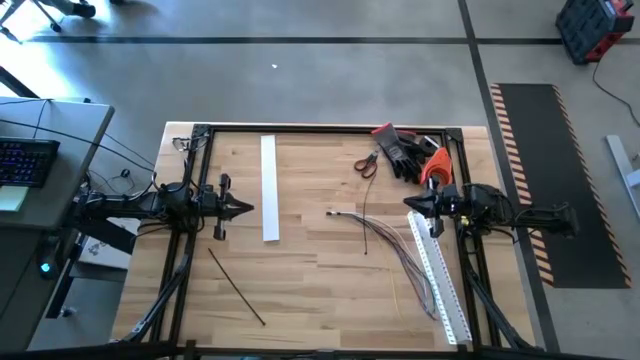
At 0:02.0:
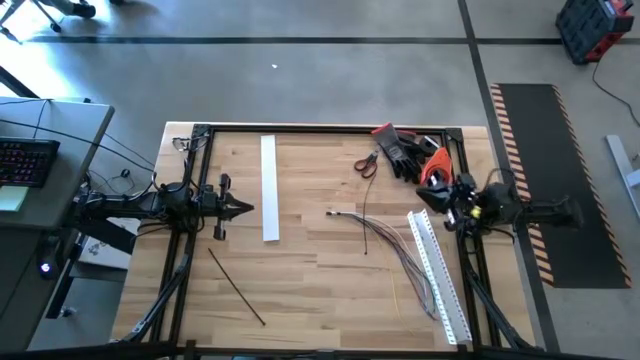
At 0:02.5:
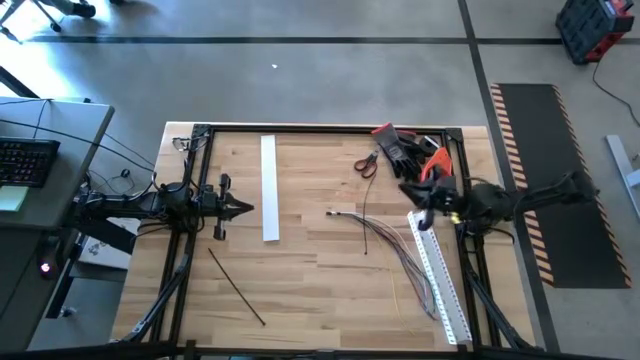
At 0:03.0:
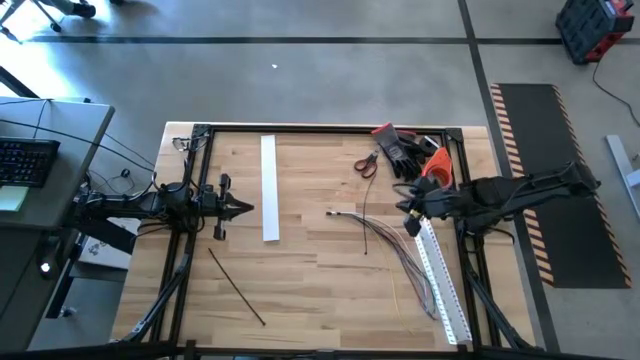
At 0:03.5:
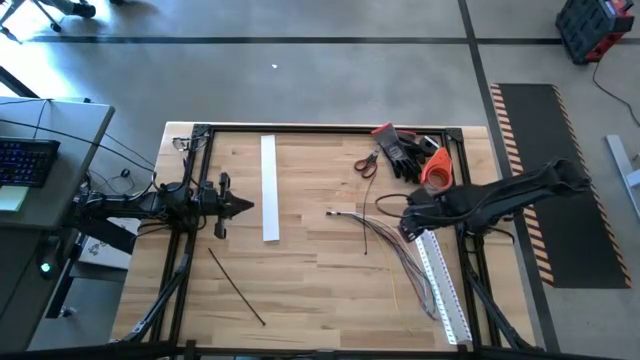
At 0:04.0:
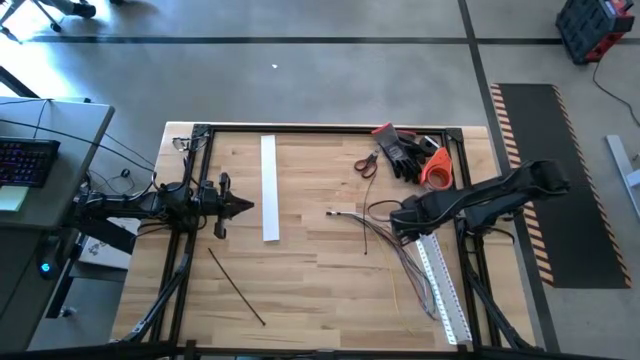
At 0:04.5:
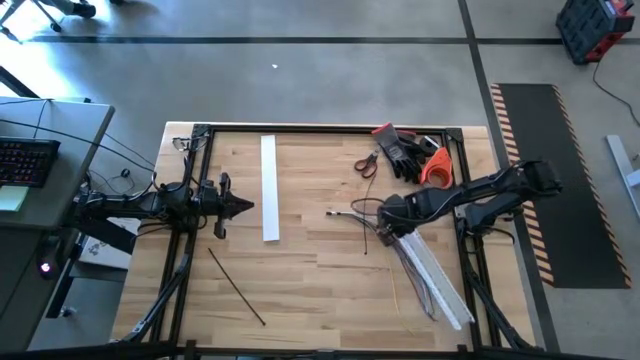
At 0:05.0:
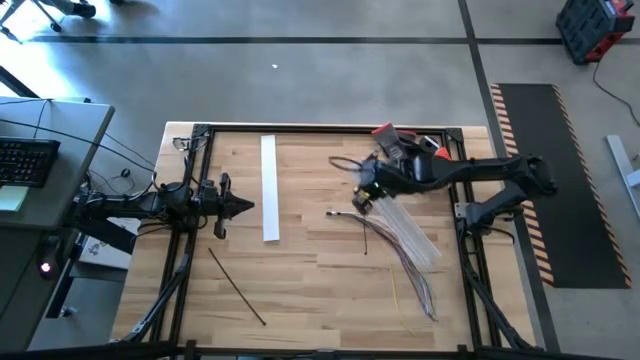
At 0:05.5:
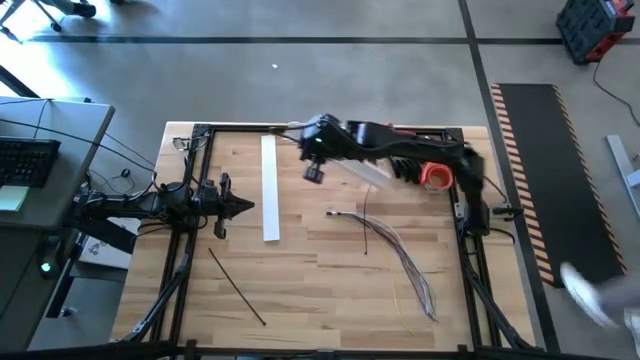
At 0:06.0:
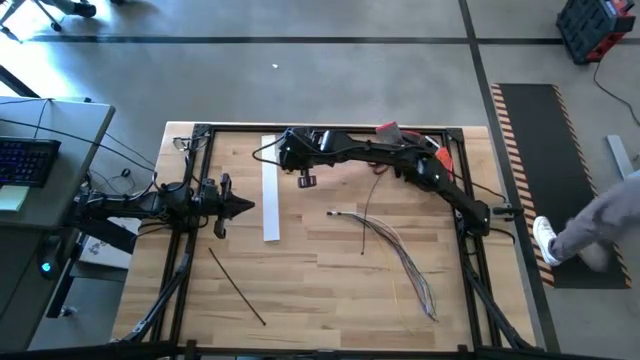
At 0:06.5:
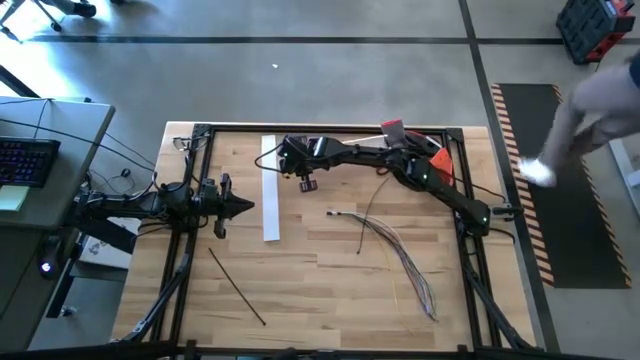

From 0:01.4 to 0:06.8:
Task: Ziptie cables
Put the white cable duct on the top center of the table

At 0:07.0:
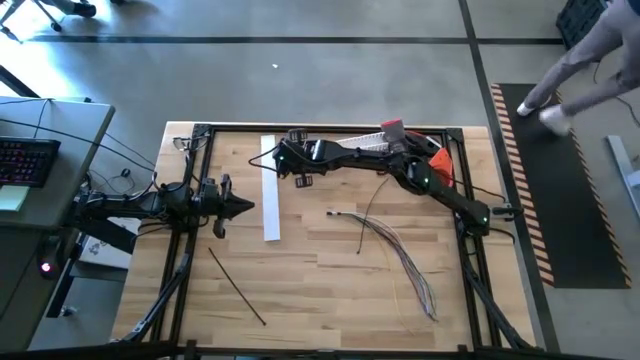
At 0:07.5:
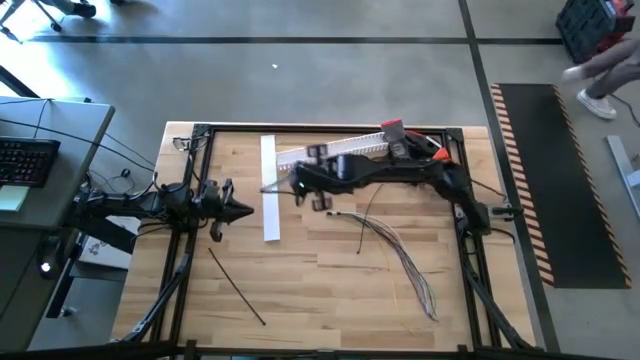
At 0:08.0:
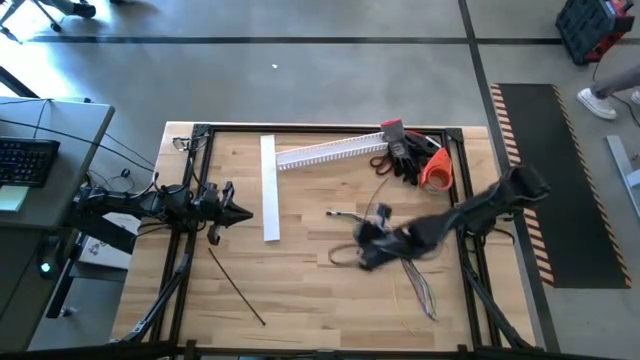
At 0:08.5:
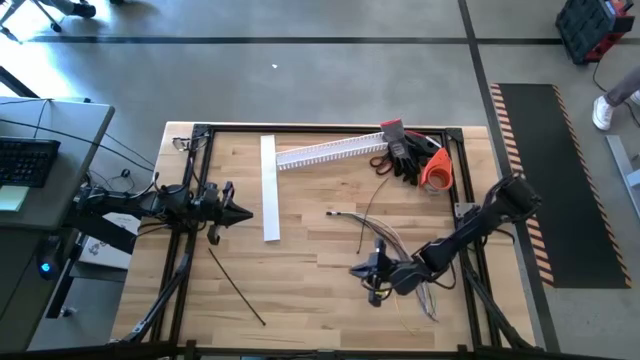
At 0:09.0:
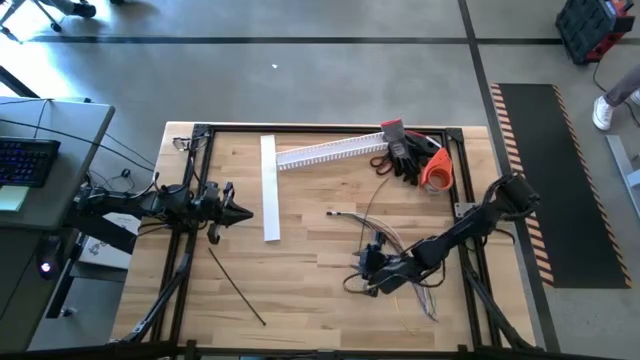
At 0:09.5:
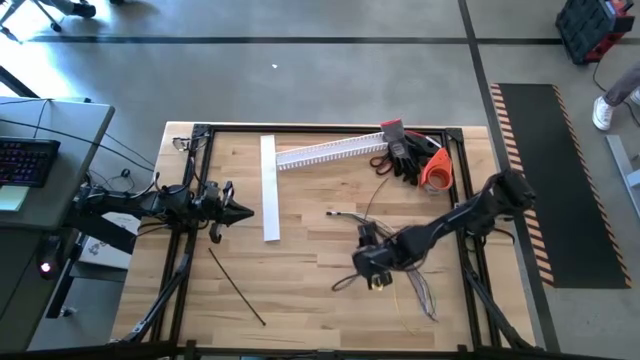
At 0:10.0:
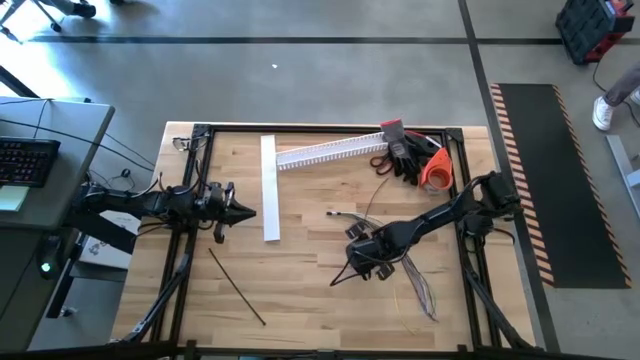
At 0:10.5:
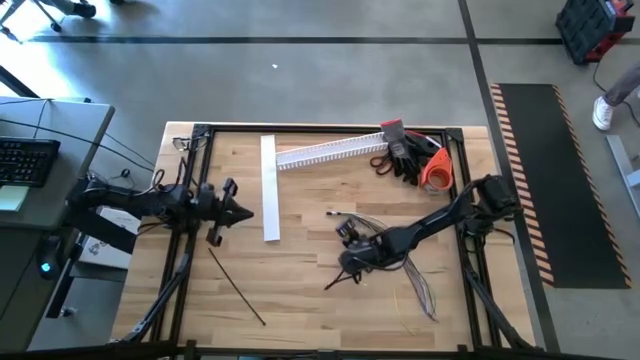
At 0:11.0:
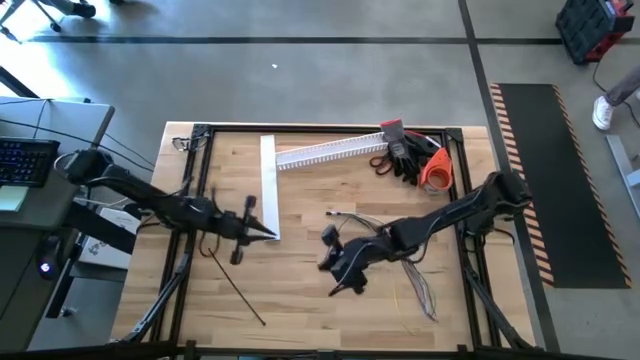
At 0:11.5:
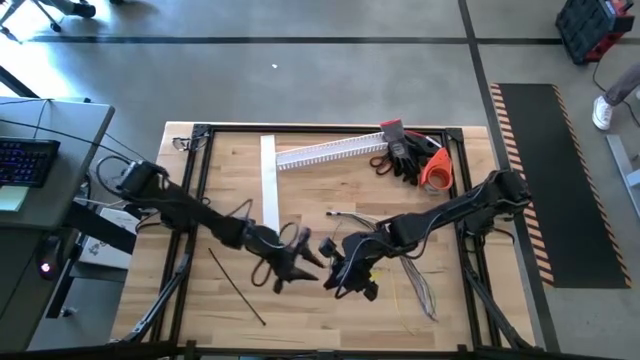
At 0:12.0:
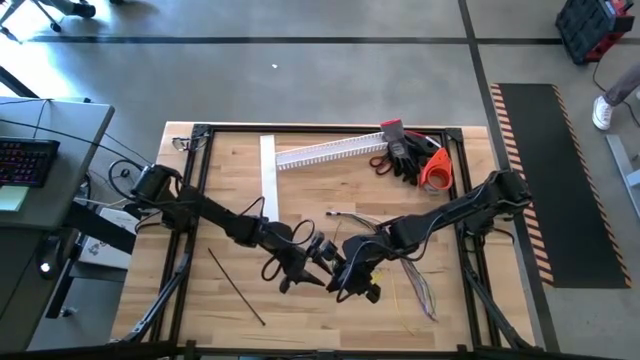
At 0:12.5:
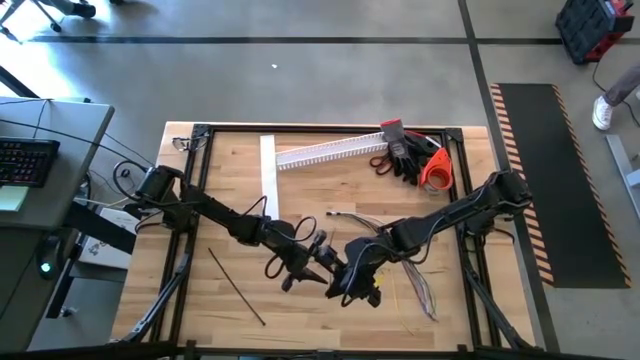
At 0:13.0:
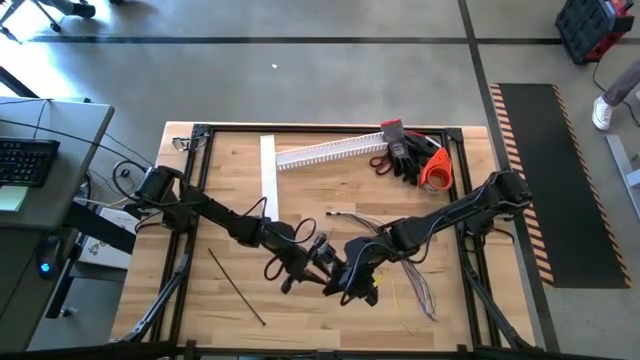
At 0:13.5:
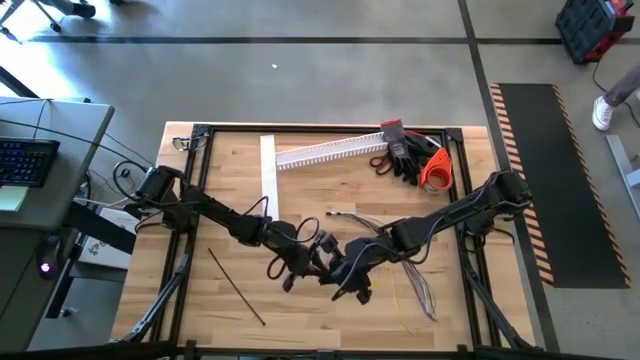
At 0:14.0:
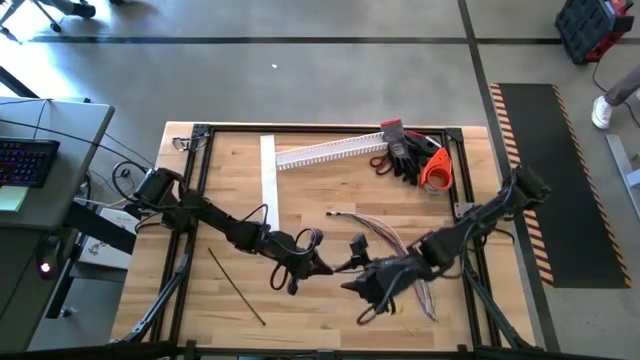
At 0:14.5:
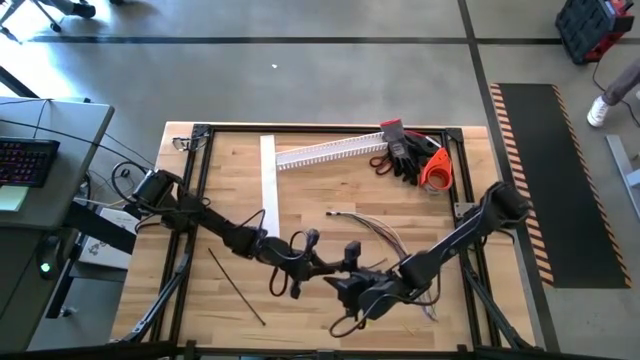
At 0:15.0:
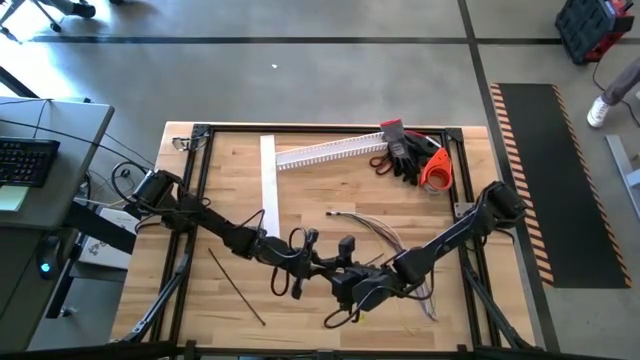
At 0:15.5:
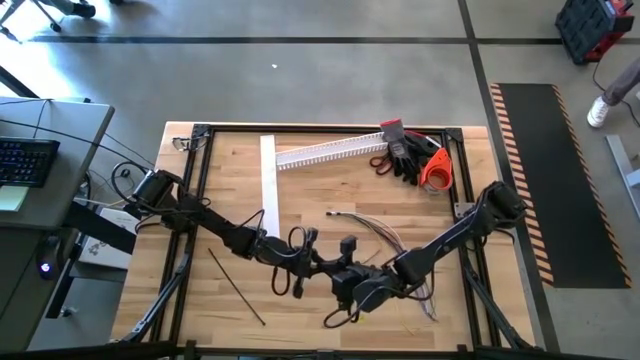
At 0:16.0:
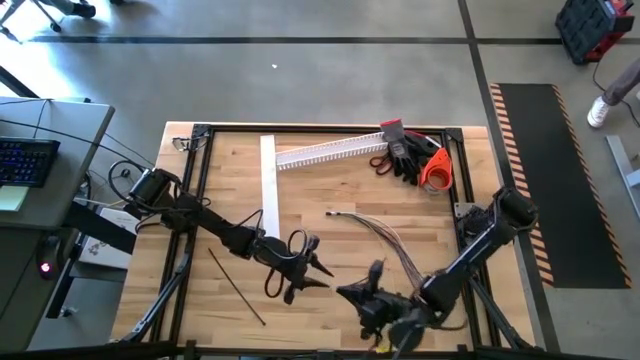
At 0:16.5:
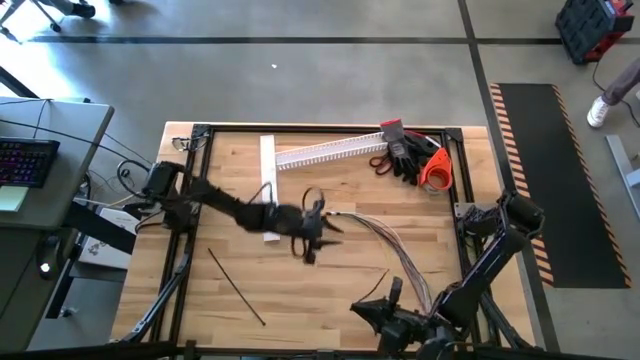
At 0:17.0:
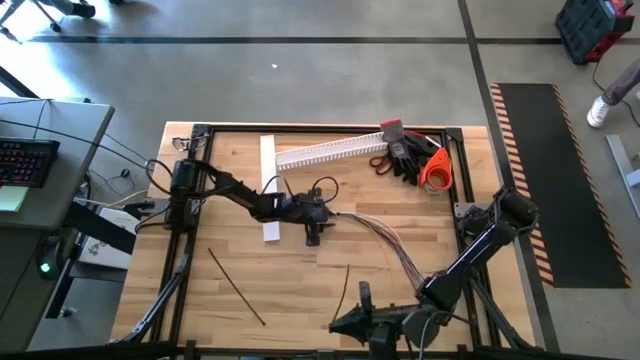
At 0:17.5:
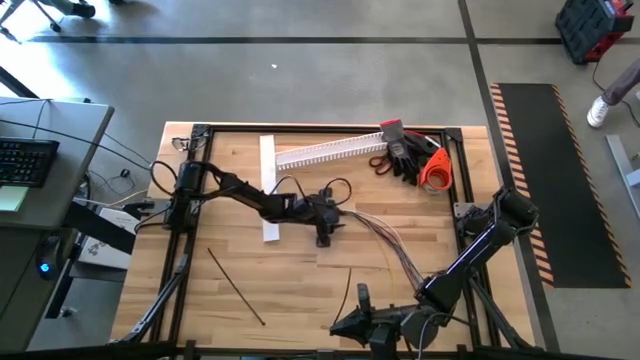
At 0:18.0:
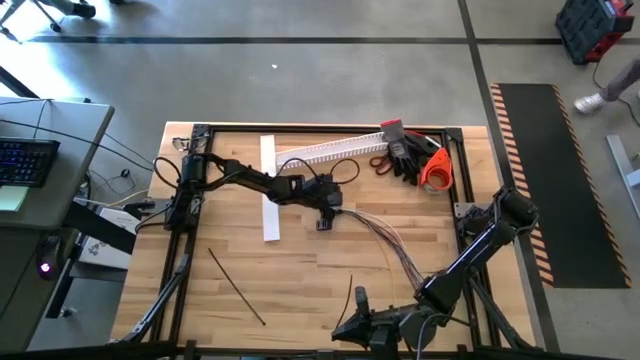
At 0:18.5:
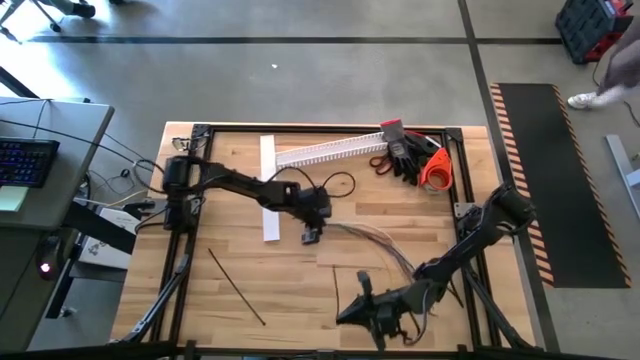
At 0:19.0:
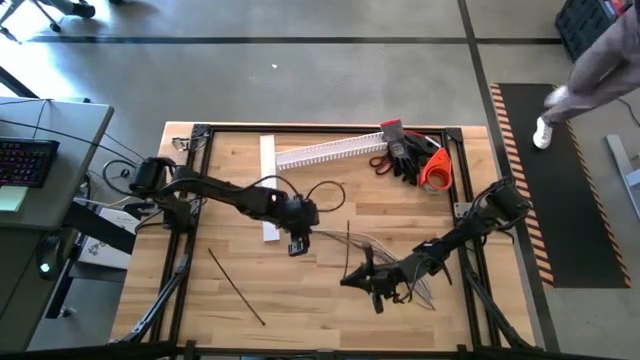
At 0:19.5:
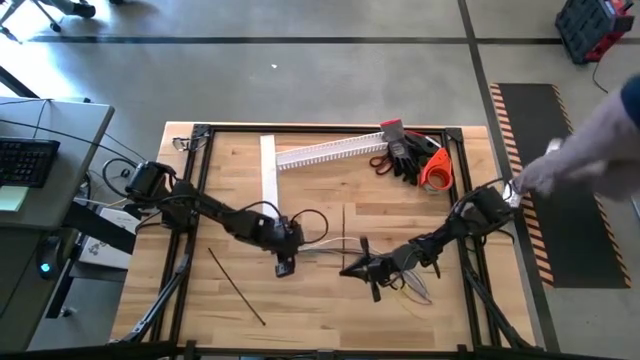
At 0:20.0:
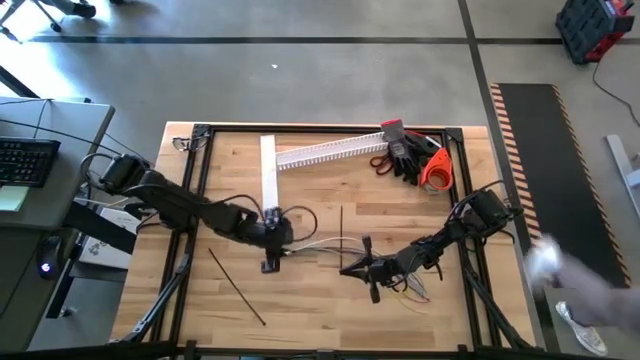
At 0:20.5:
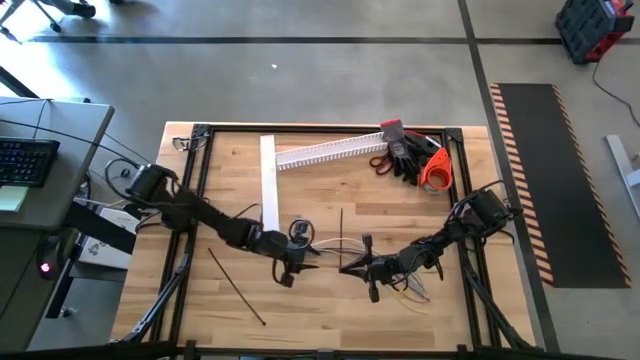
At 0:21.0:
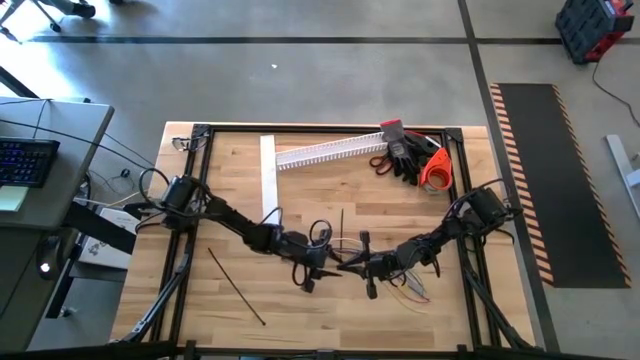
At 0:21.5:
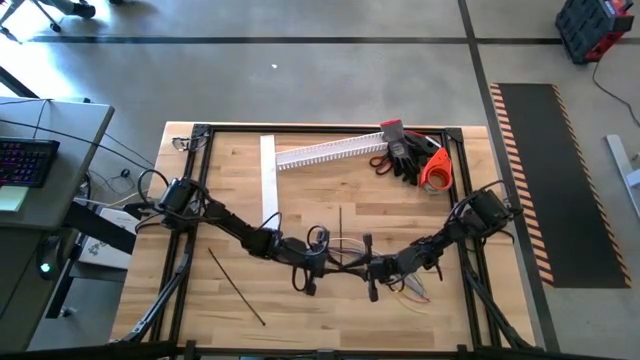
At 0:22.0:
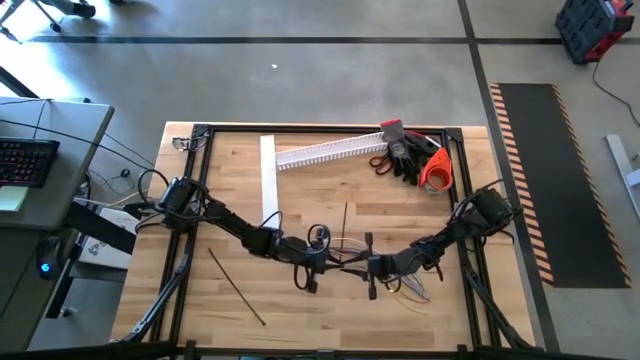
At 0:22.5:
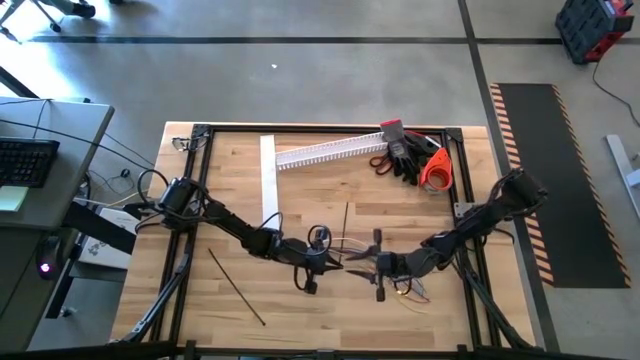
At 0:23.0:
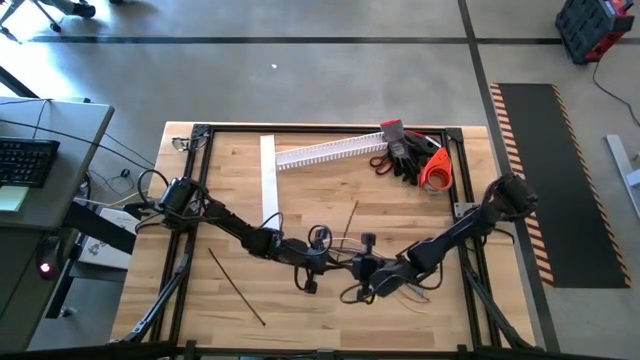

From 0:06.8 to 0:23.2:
Wrap the cable wires with the black zip tie
